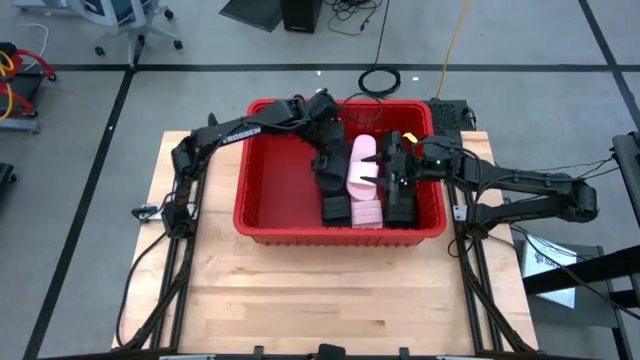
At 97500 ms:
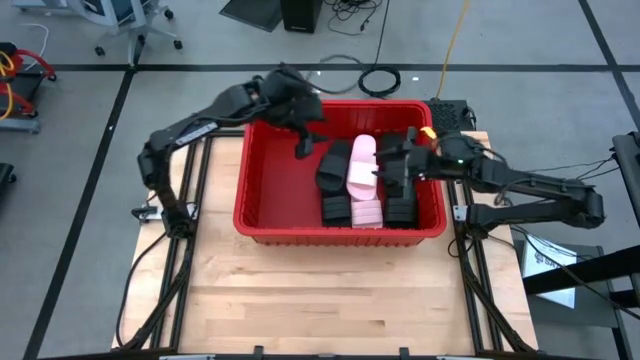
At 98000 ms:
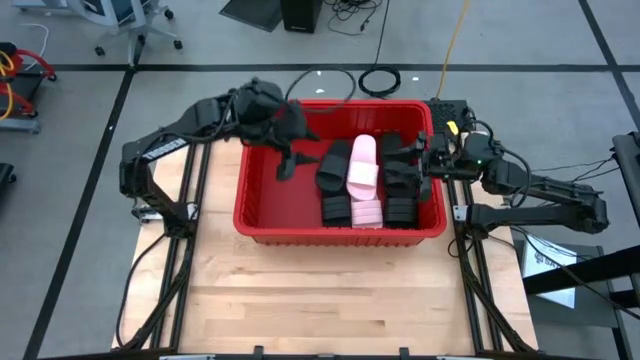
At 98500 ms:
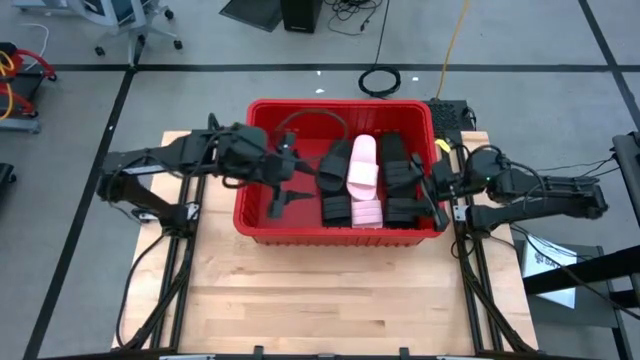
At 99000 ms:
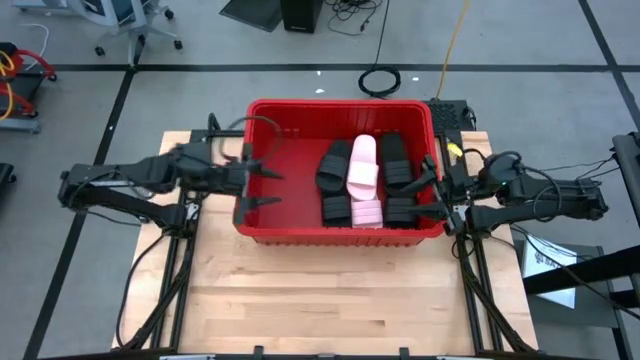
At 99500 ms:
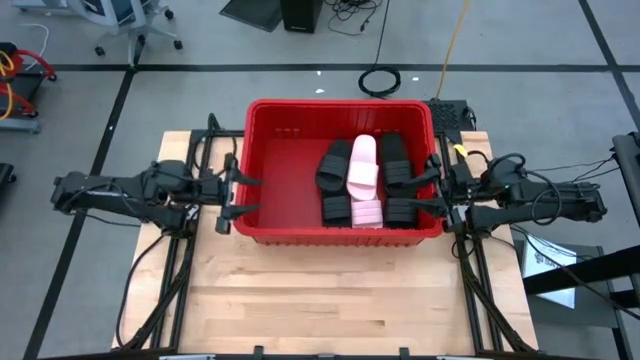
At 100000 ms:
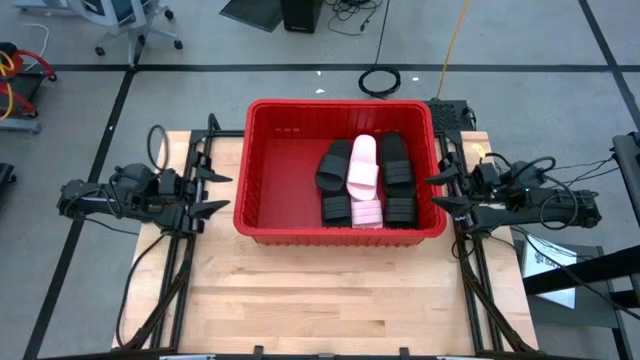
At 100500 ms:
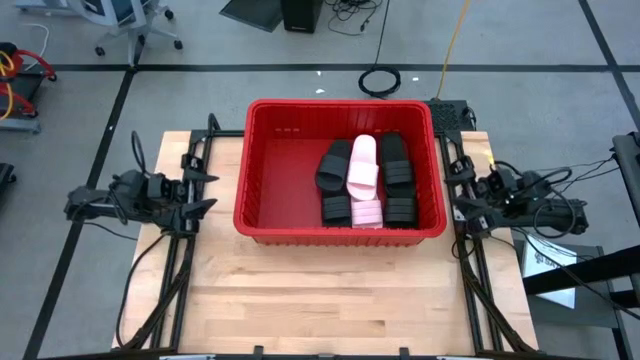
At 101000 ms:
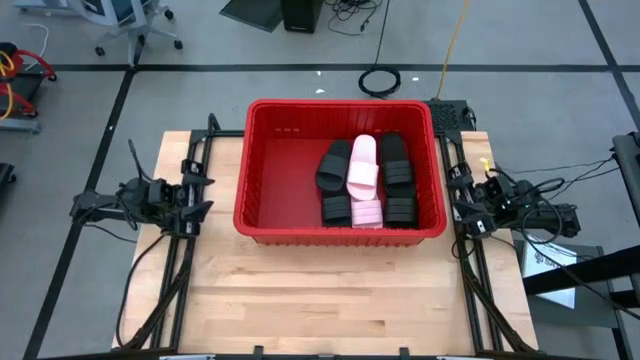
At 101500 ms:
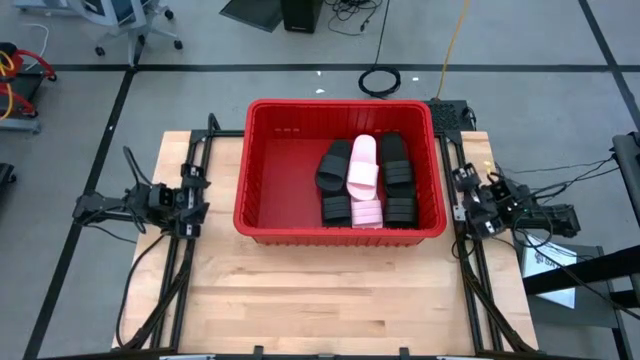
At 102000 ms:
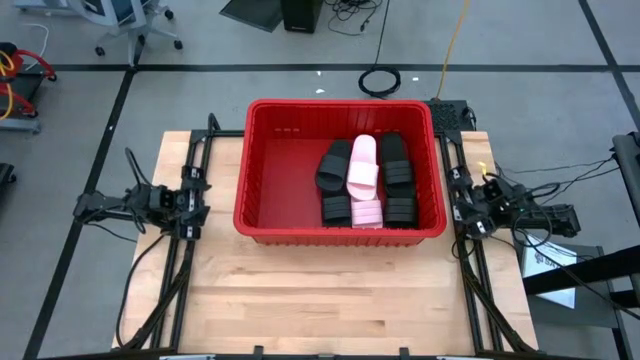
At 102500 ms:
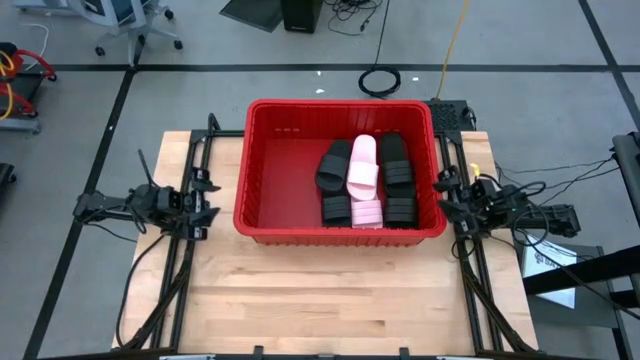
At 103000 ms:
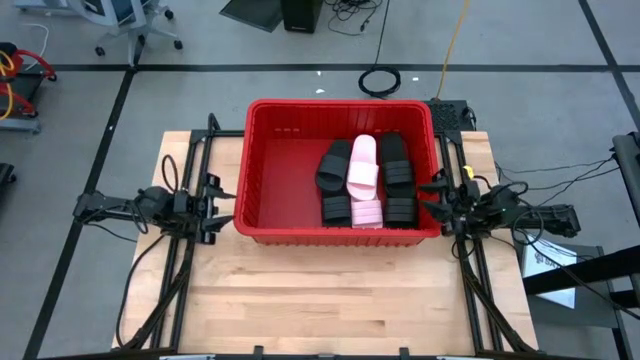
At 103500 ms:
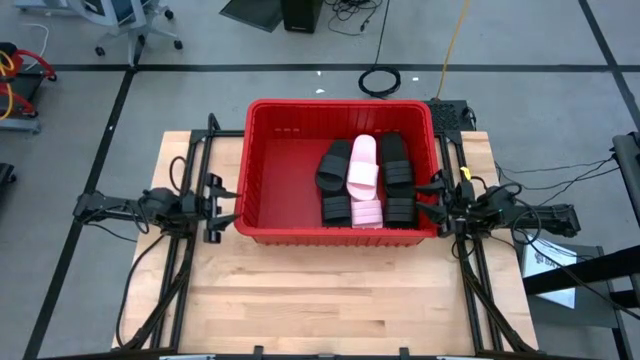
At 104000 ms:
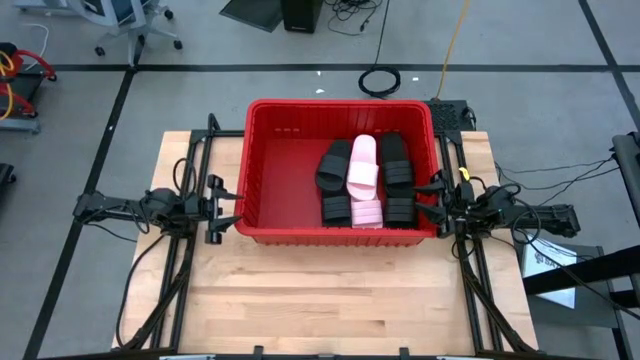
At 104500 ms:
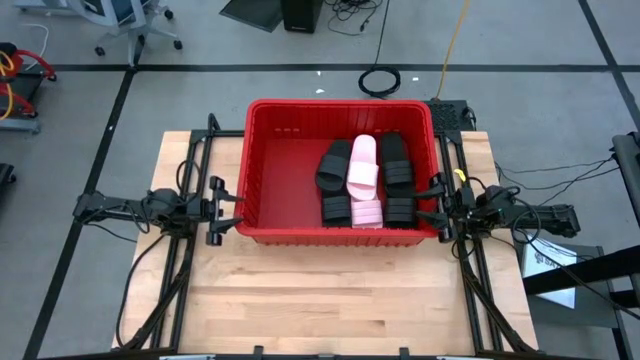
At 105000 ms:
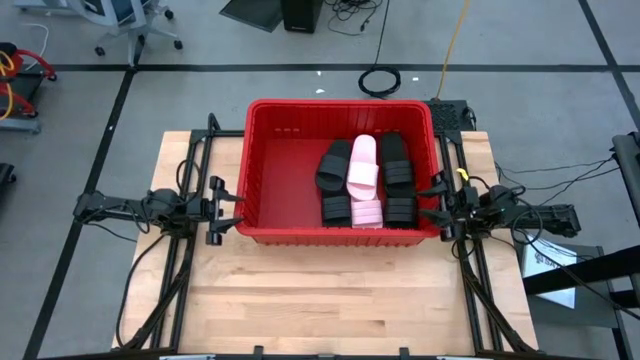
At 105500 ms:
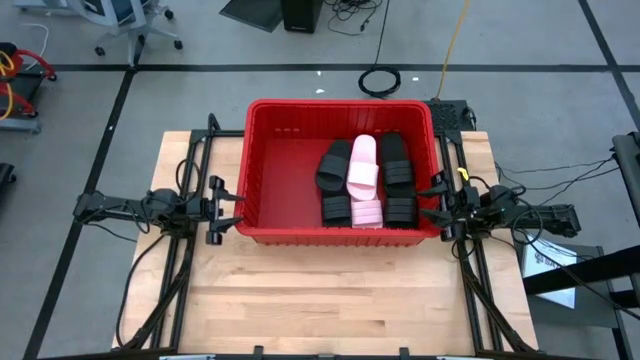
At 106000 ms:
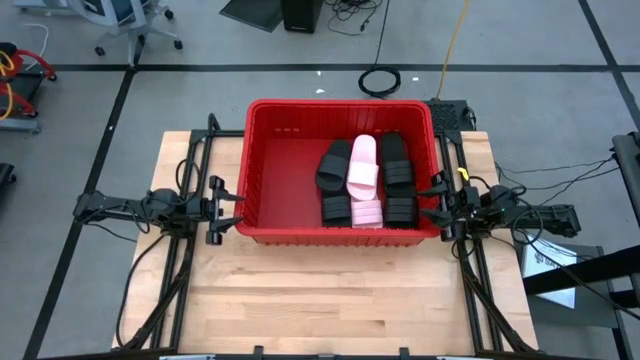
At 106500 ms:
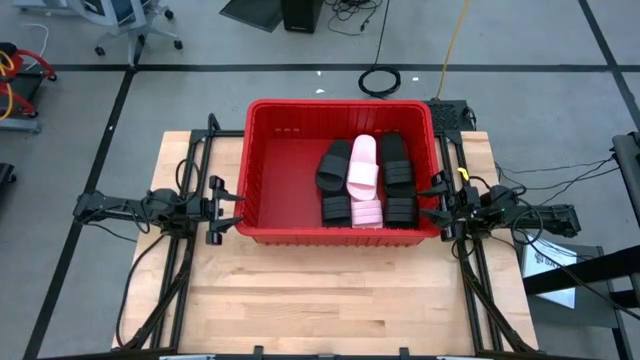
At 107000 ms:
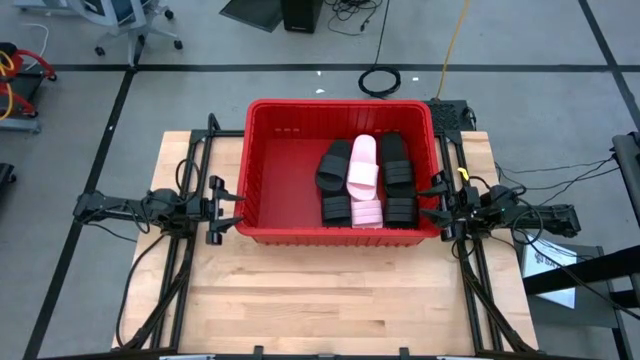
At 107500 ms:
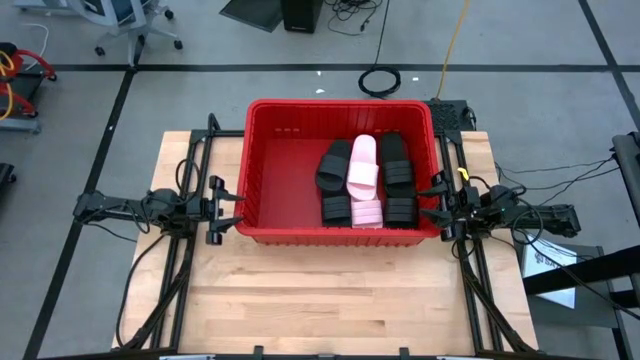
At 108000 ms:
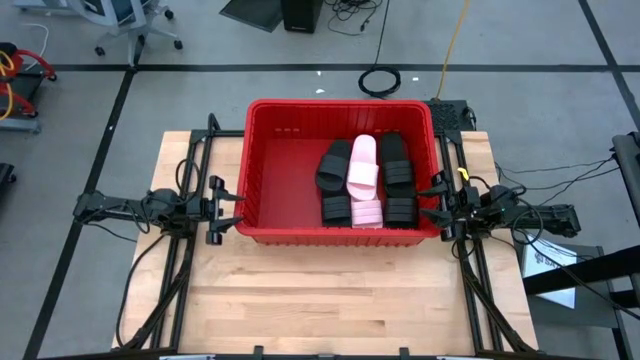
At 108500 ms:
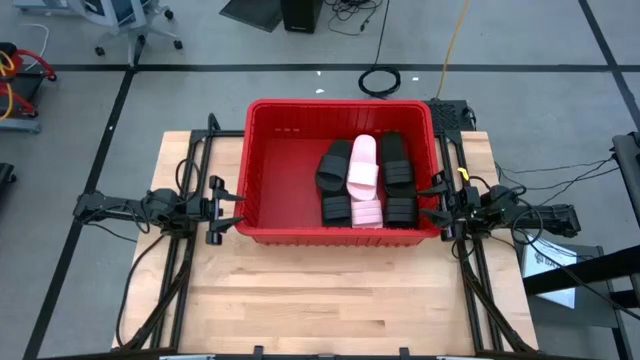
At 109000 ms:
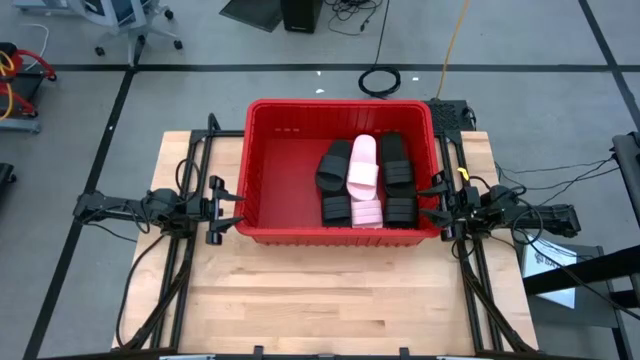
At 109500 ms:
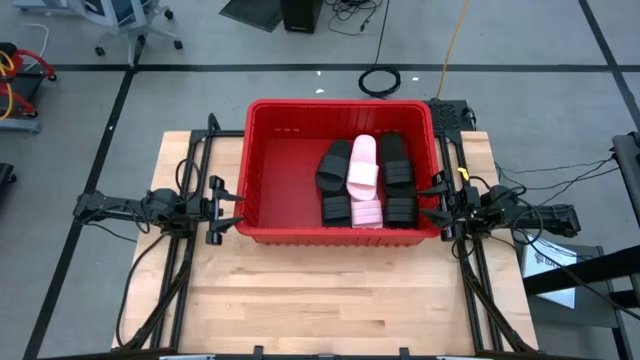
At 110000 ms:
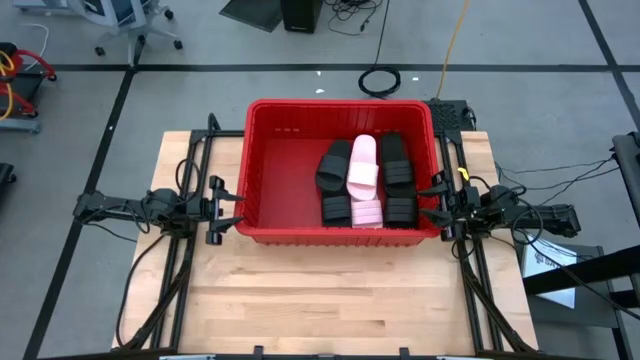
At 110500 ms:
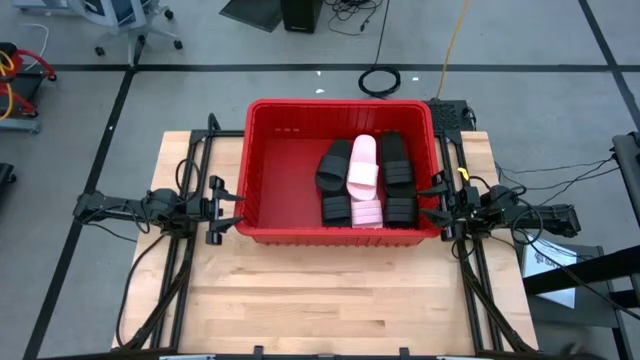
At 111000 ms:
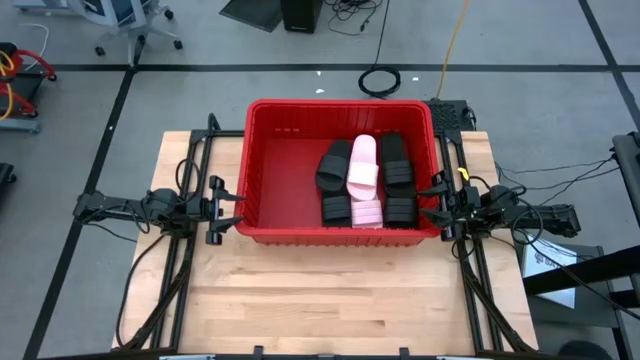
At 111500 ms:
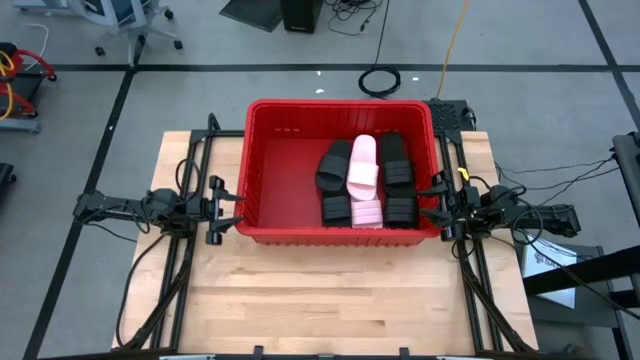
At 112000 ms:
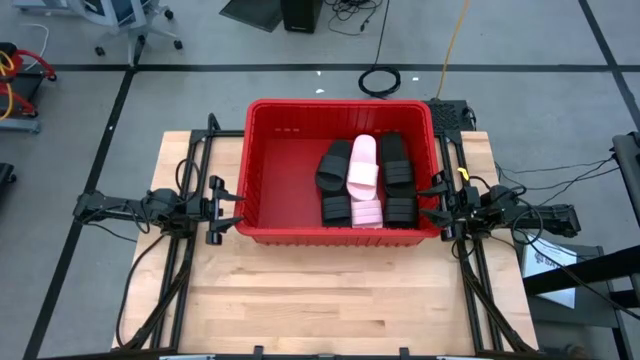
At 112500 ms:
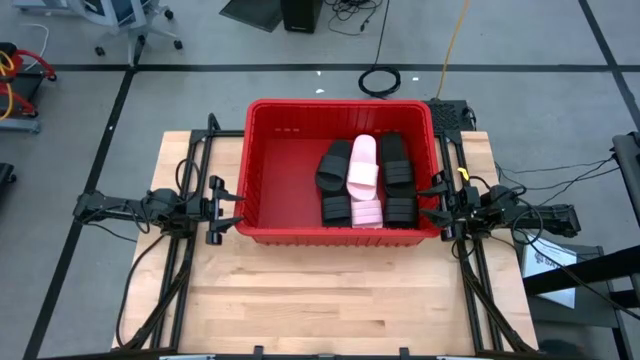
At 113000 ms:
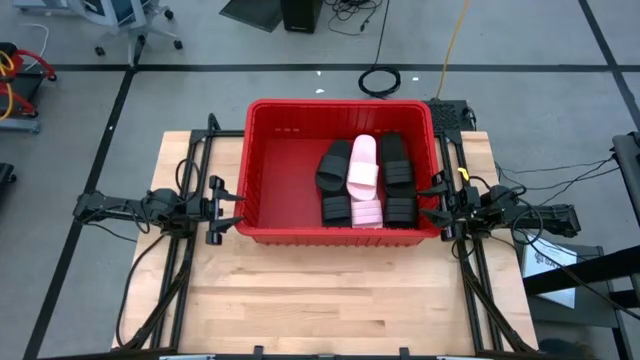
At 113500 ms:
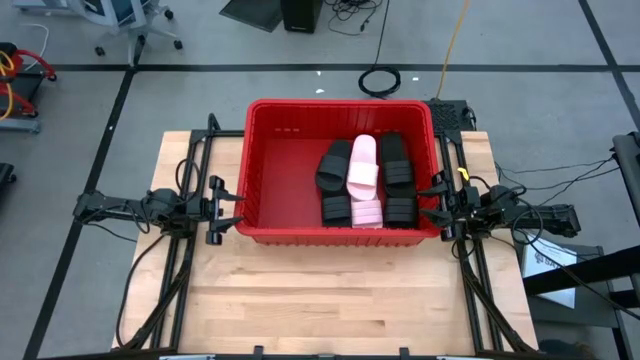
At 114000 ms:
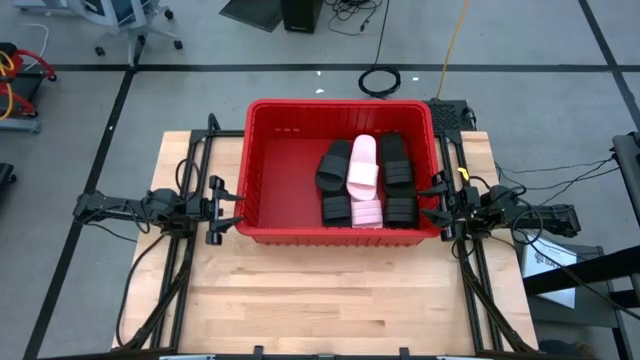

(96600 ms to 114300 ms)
Task: Pick and place slides into bin
Return to Home Position

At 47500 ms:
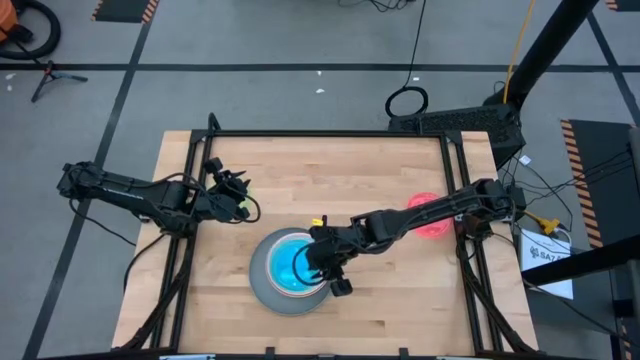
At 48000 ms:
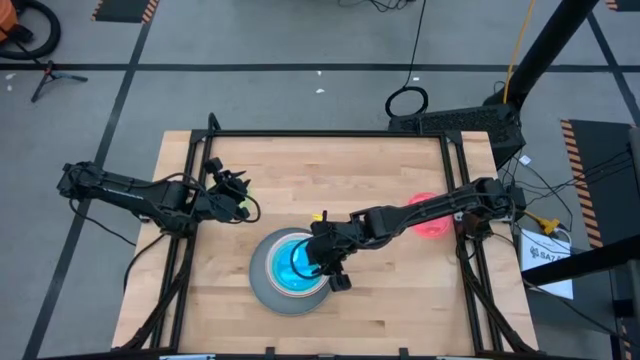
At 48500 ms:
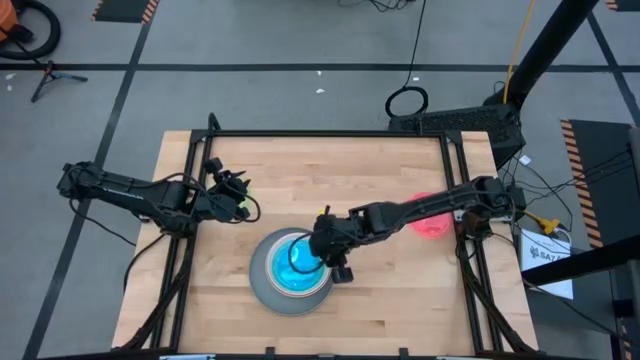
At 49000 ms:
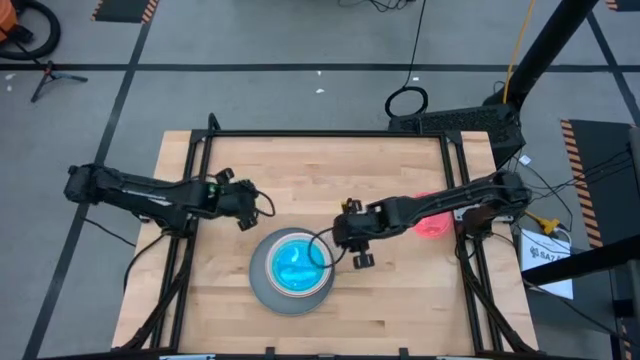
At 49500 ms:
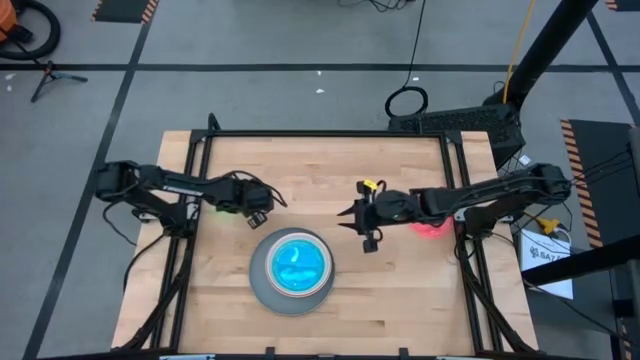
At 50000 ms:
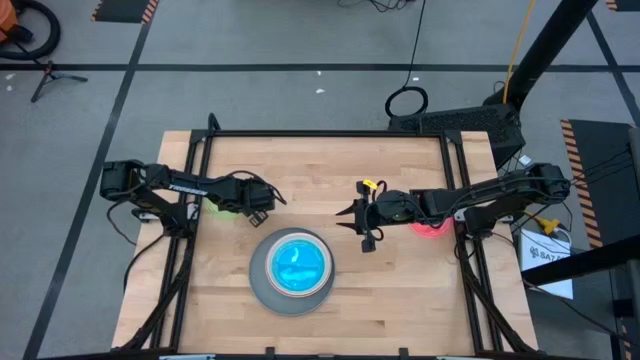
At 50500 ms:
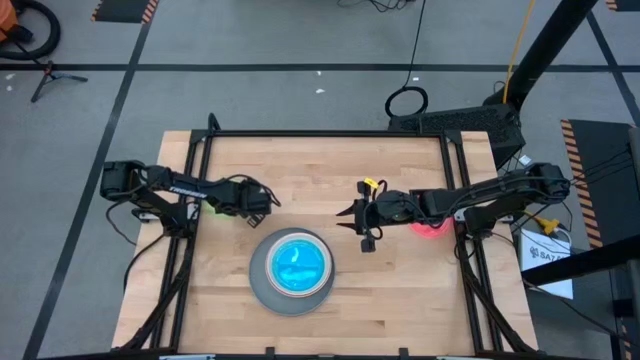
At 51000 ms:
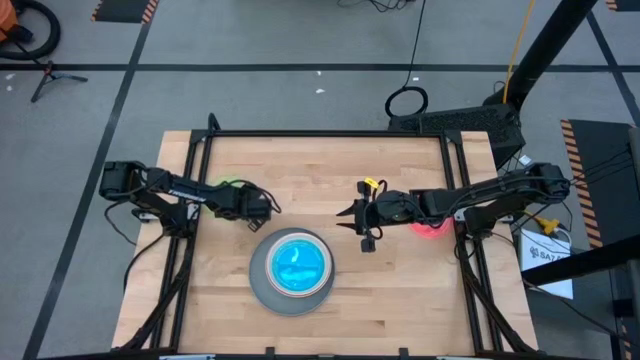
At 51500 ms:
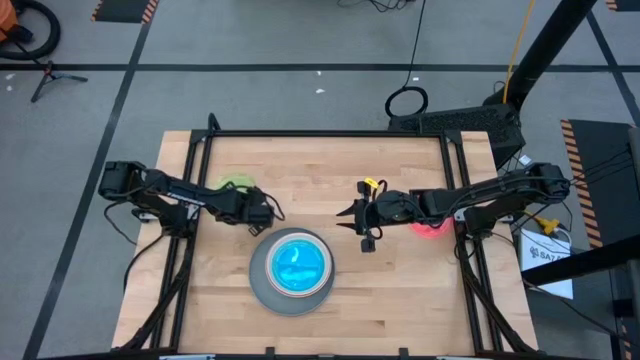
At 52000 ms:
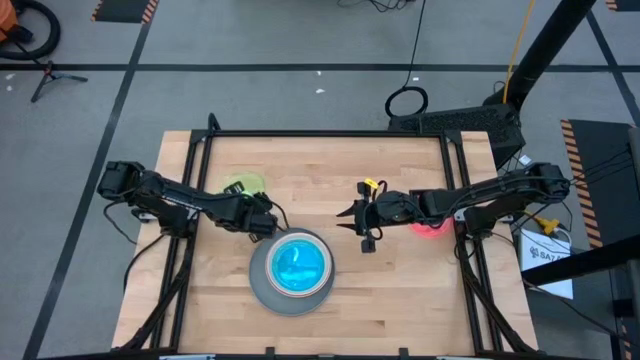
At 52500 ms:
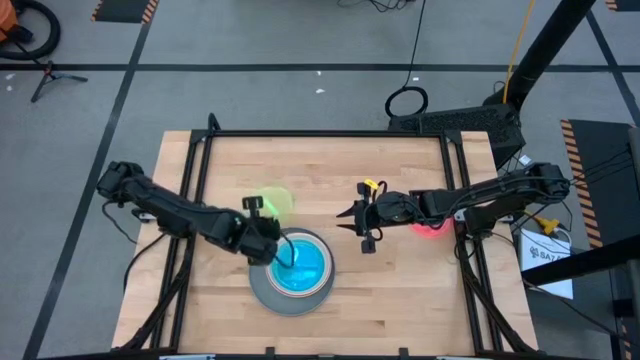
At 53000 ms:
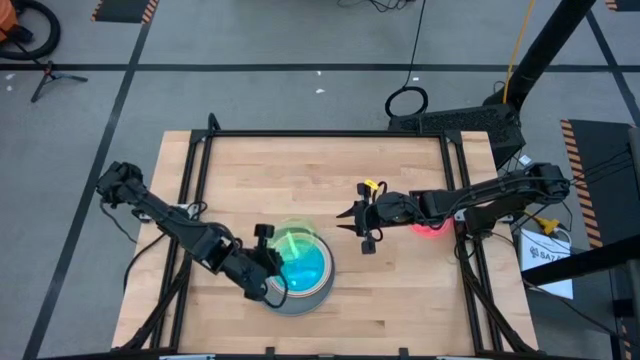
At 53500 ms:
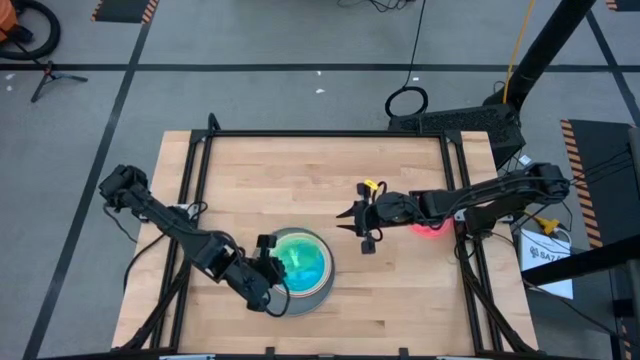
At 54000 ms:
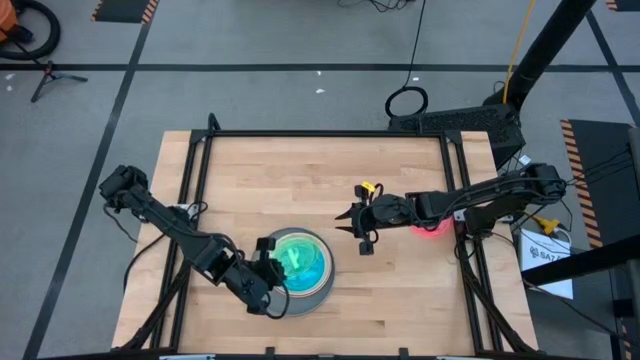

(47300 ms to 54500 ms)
Task: Stack plastic plates
Stack the green plate on top of the blue plate
